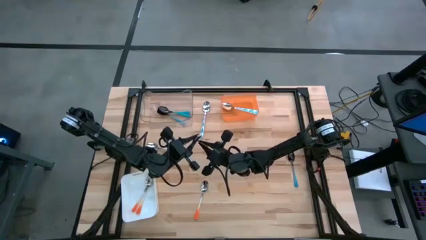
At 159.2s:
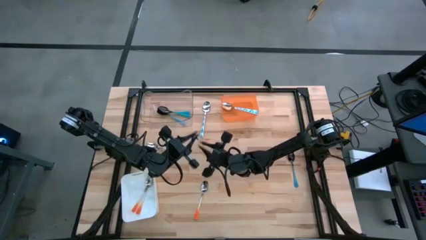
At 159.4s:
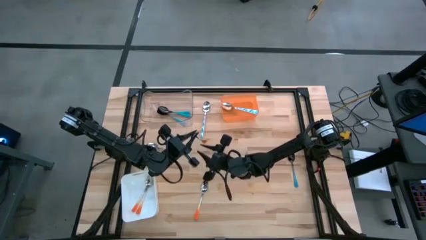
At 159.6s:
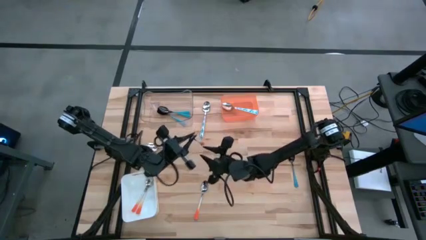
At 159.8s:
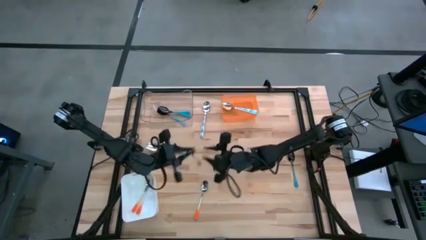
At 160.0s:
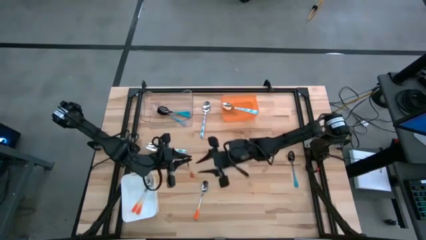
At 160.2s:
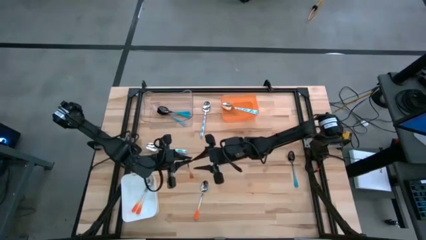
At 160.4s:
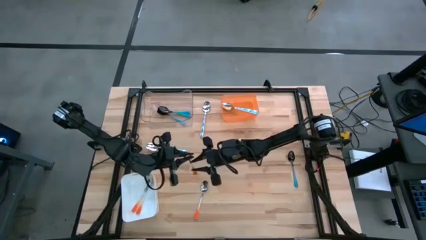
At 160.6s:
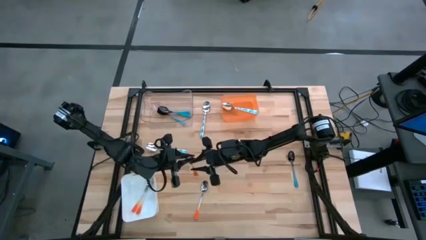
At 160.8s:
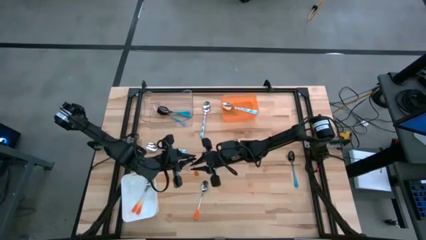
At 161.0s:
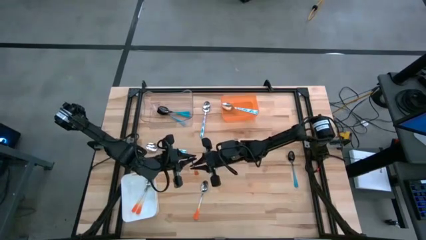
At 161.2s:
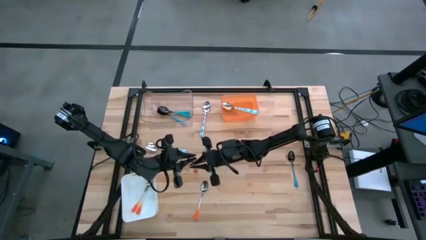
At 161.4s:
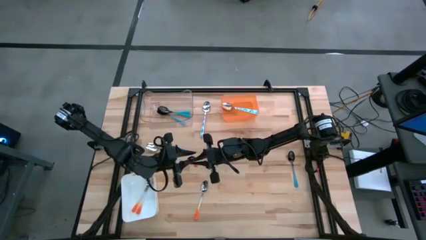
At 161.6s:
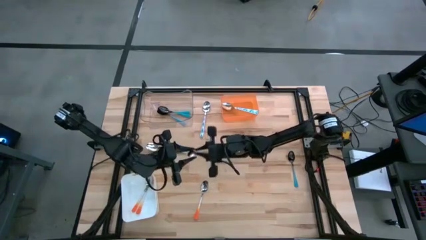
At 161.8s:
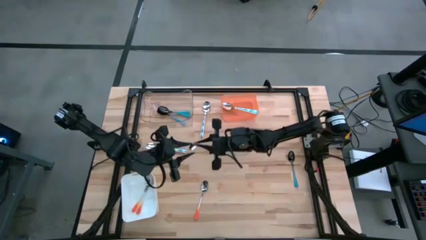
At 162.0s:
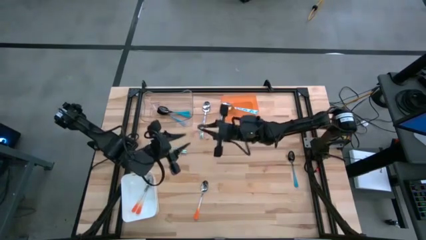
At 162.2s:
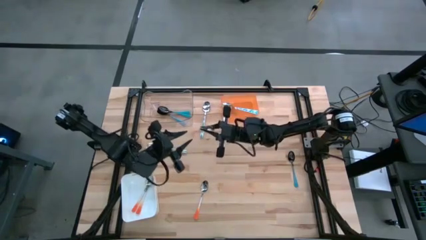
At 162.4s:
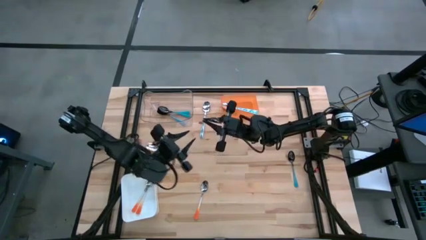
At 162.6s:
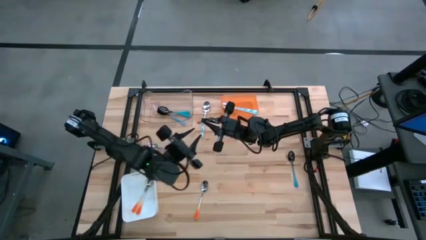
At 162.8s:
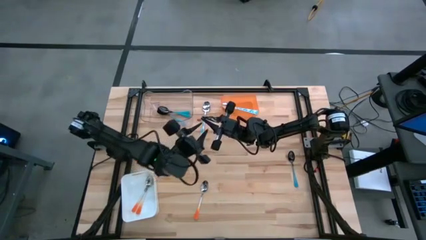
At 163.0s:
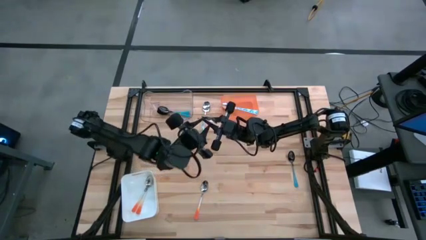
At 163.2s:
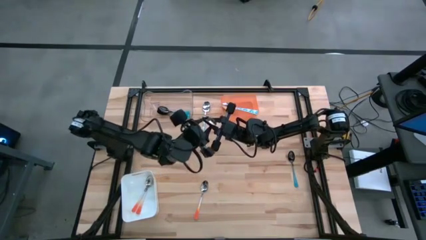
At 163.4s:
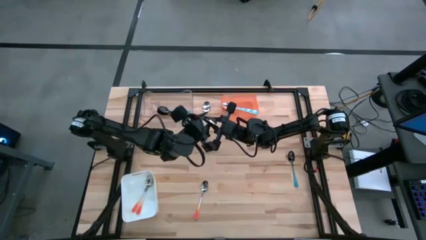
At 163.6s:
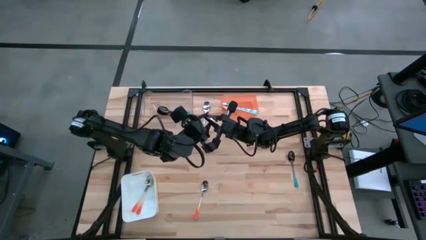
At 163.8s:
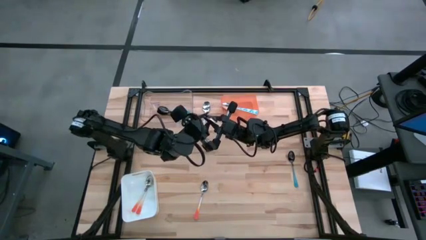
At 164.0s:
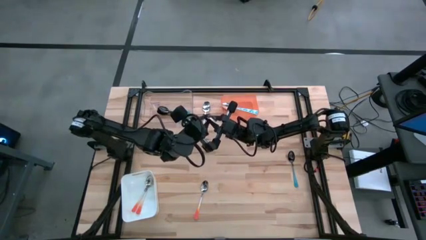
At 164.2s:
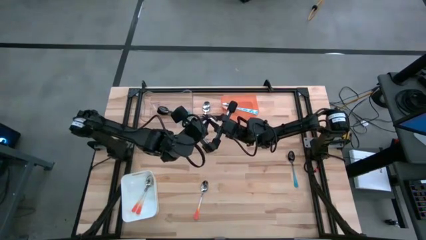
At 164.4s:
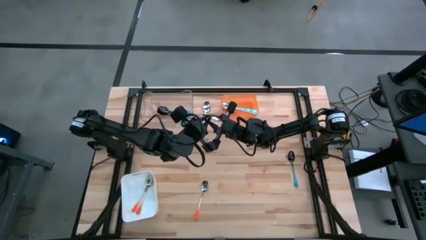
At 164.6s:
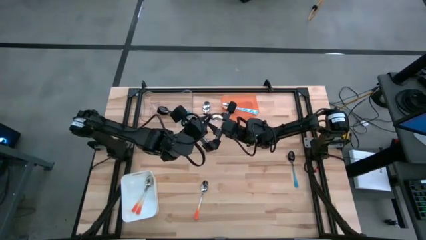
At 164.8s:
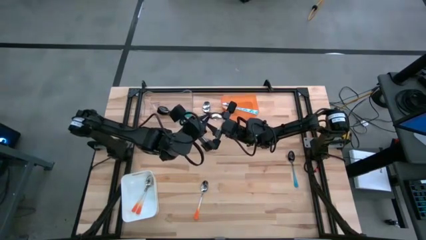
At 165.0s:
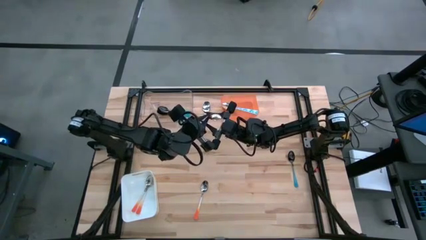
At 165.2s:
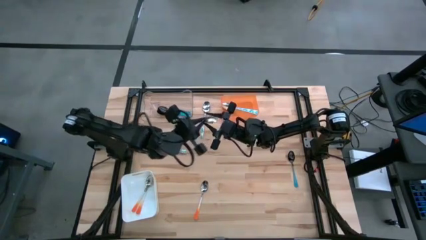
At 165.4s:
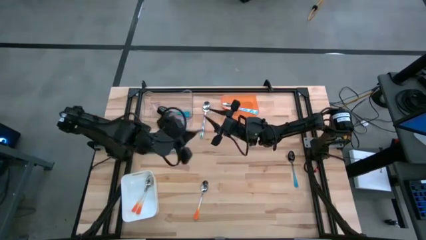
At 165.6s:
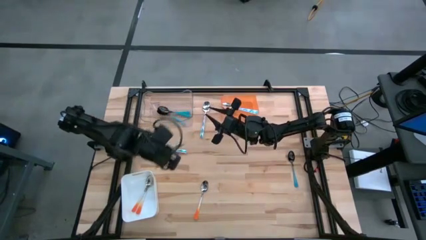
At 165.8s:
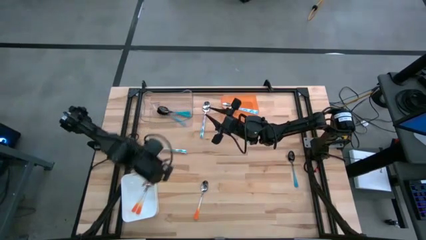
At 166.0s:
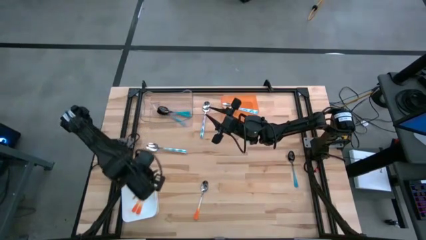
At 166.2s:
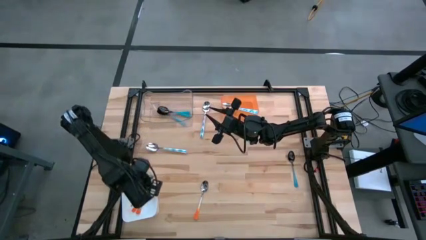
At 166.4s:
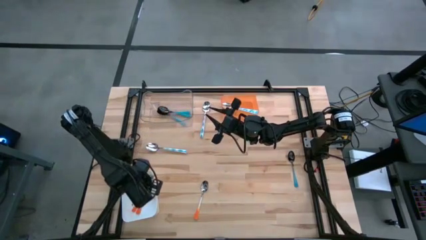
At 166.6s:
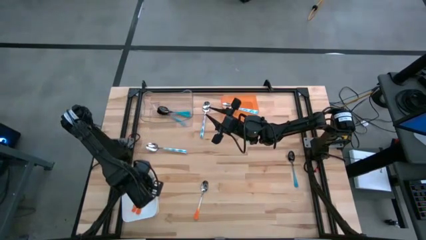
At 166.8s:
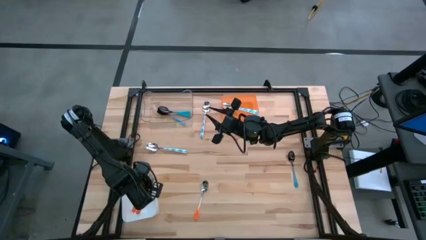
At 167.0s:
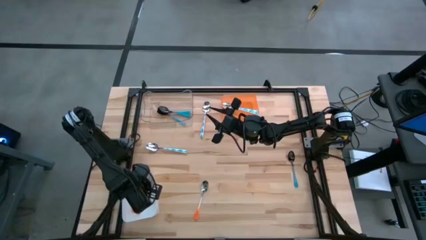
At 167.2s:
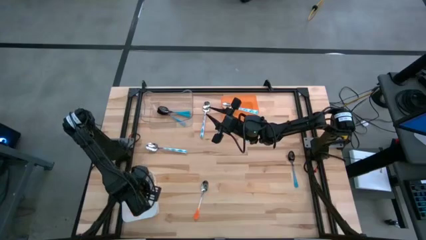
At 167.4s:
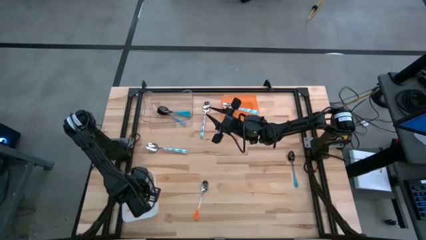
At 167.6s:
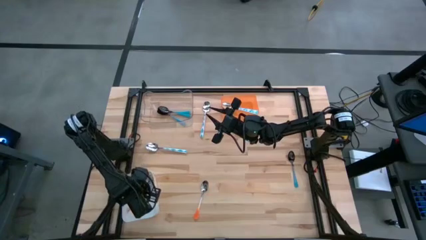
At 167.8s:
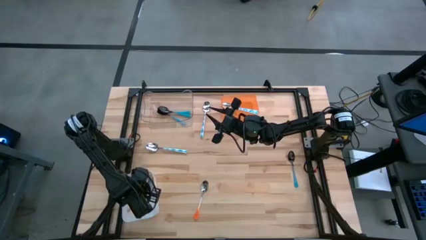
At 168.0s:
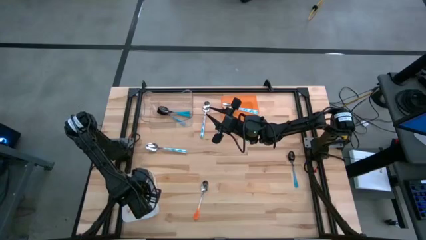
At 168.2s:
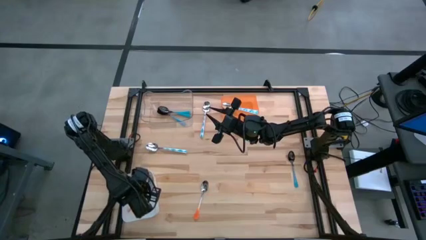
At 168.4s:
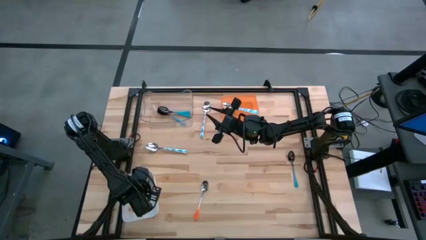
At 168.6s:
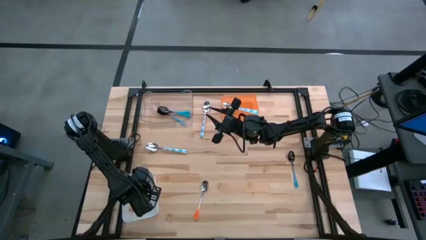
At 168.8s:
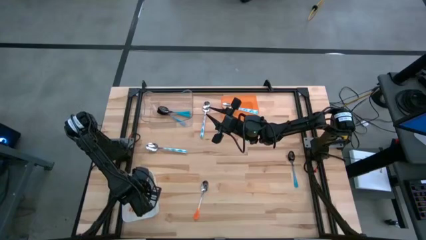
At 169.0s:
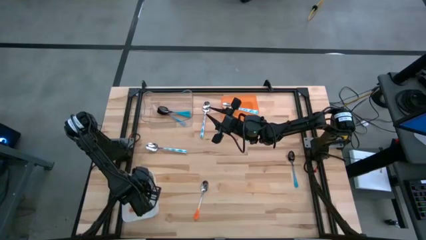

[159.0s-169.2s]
Task: Sort silverware by color (type)
Put the orange spoon into the white bin

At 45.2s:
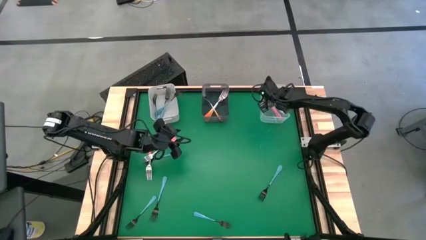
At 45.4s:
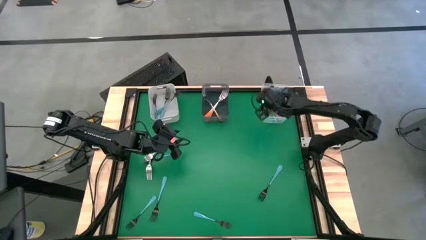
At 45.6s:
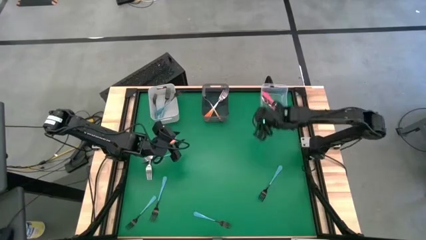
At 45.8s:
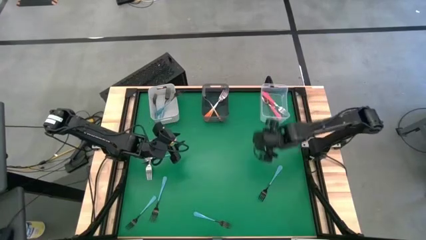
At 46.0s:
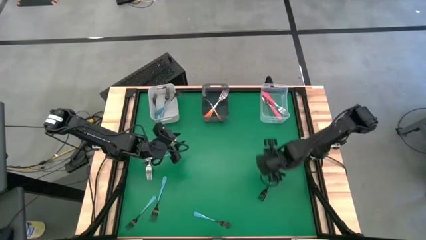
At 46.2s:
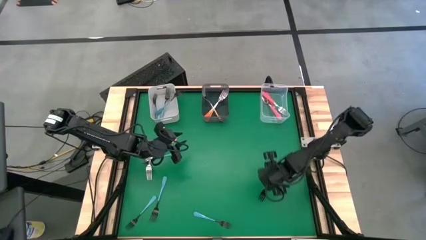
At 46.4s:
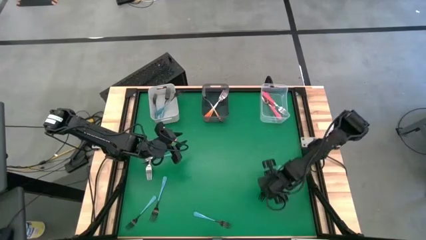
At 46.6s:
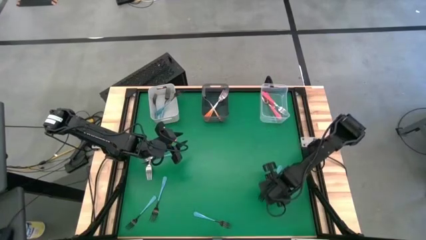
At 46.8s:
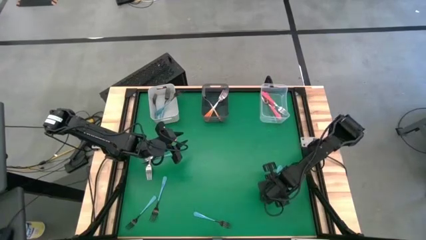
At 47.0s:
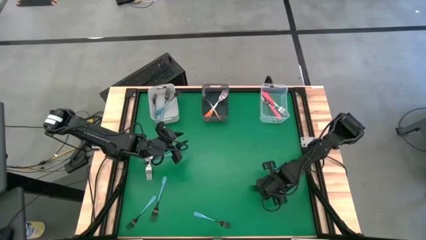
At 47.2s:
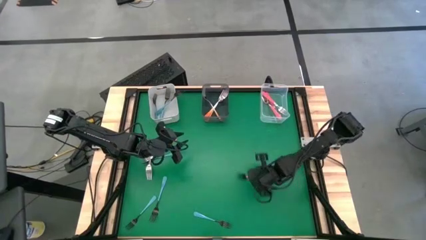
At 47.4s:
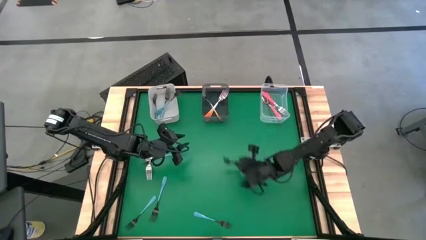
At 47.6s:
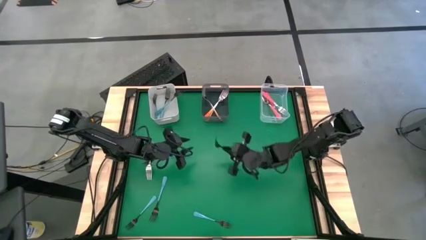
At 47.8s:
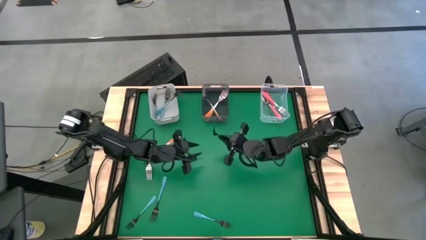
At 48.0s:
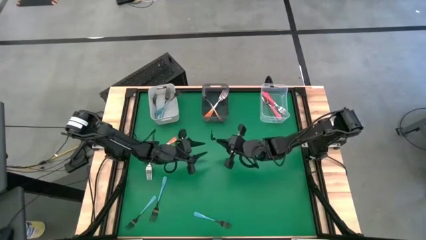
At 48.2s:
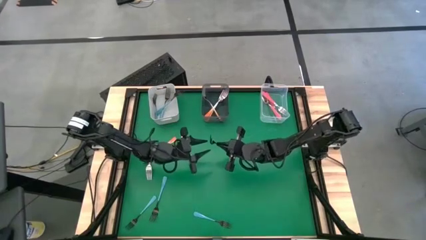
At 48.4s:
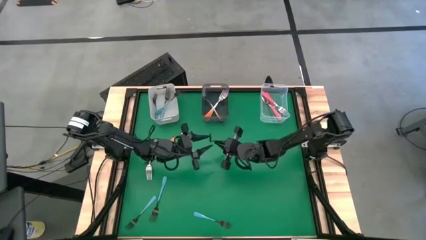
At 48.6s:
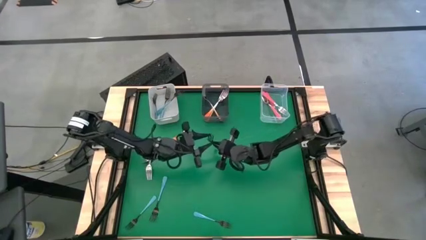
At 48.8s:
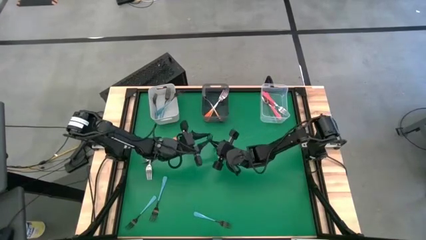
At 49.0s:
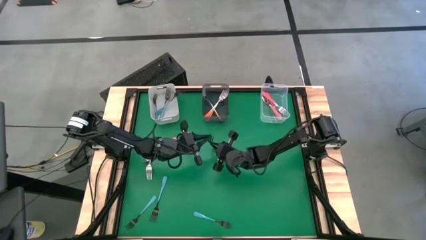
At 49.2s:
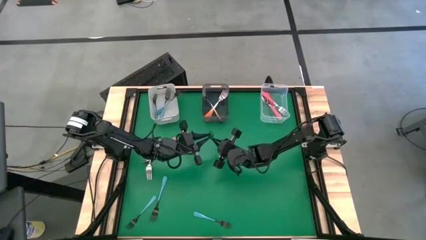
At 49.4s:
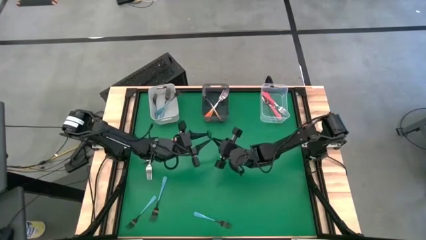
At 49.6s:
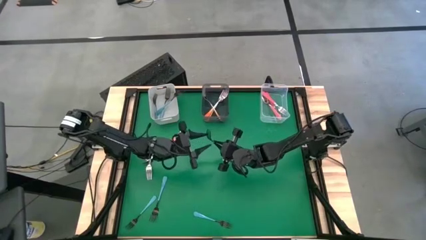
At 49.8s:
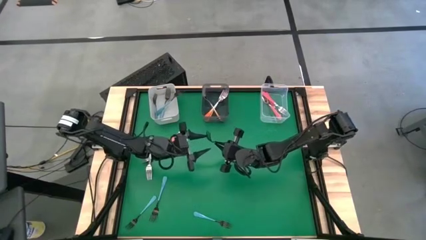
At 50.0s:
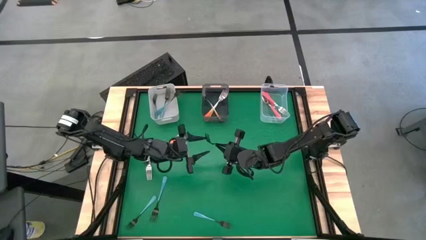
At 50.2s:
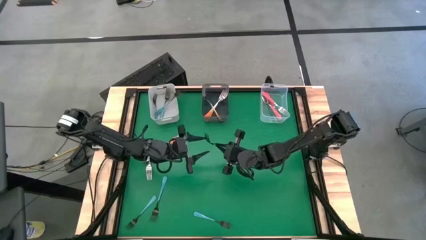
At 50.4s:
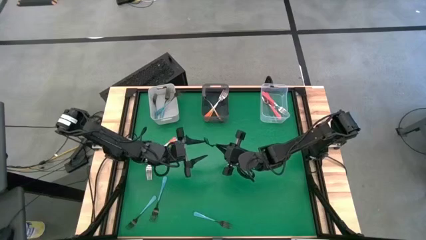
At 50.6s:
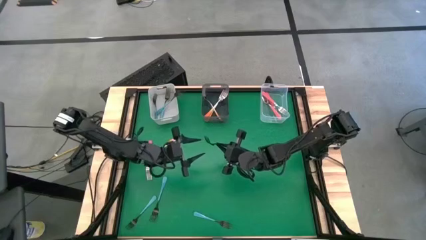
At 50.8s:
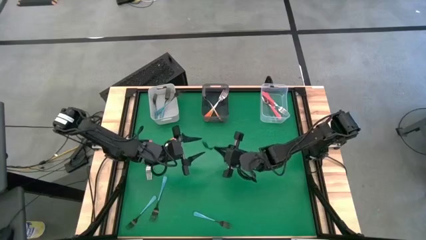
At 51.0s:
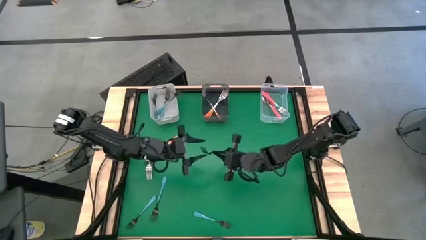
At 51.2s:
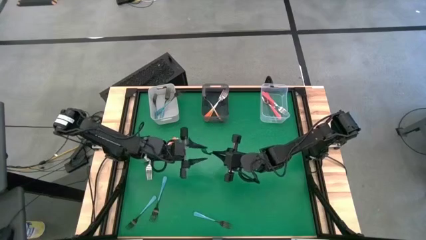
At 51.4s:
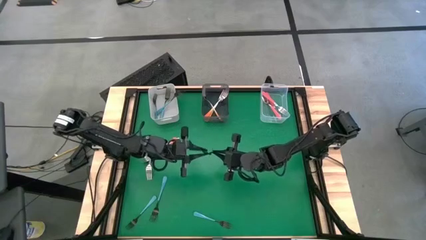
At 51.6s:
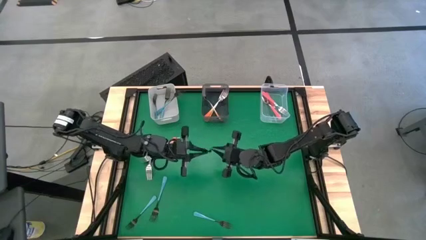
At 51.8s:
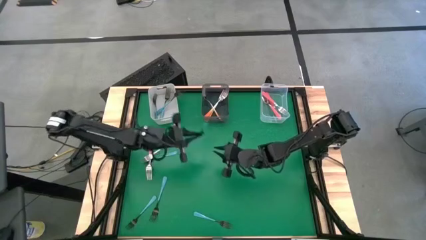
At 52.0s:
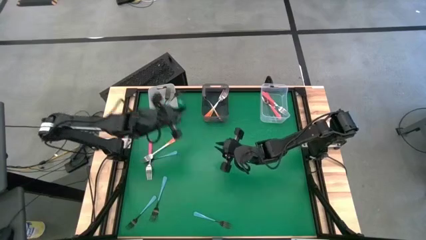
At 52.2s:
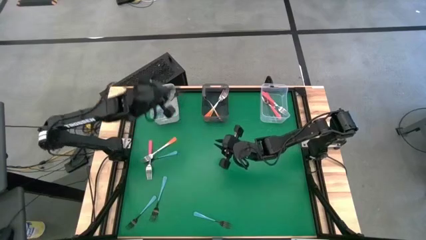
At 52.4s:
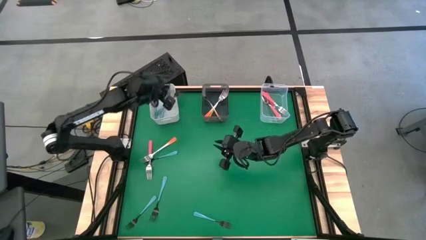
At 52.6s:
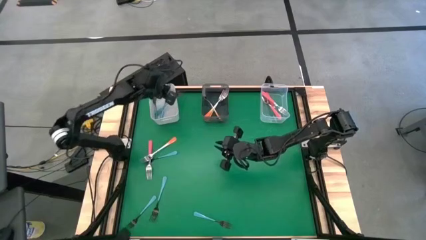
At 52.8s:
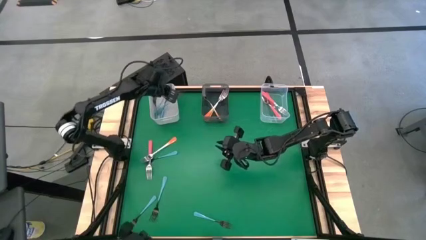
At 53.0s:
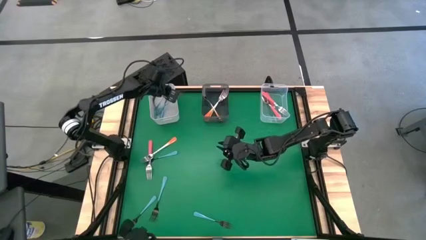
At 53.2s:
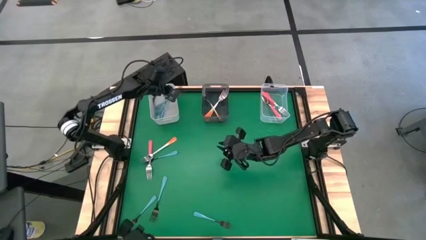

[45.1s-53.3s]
Task: Sort silverware by color (type)
Put the blue fork into the white bin
